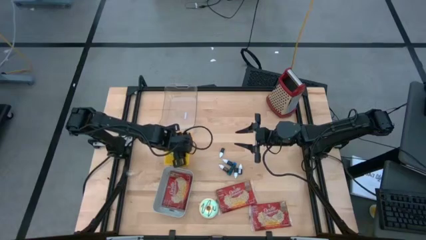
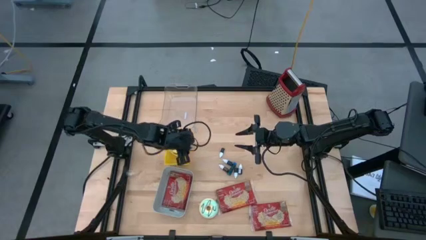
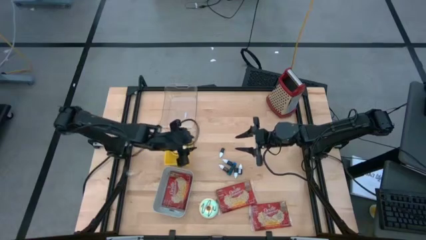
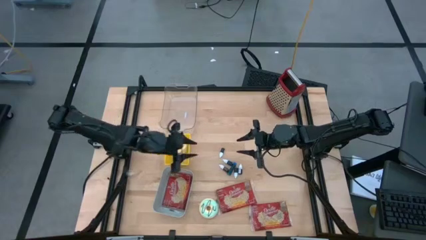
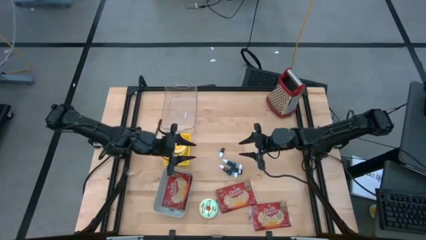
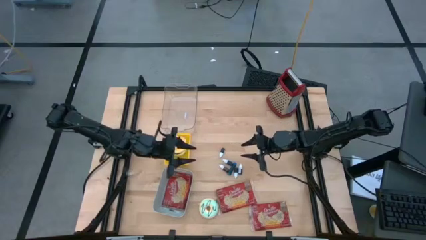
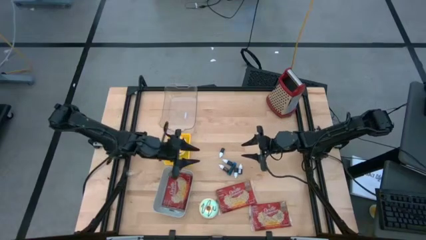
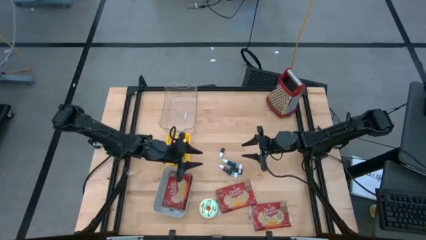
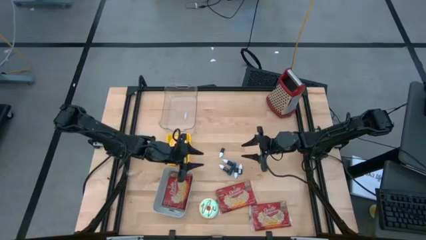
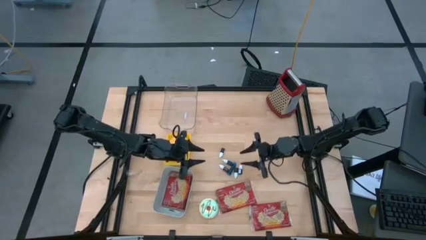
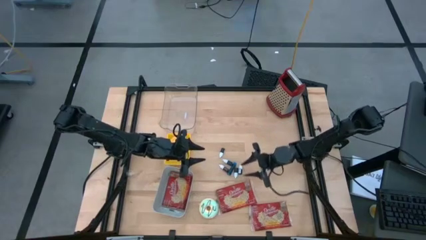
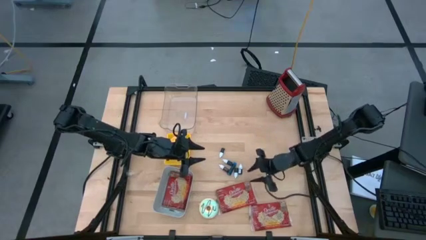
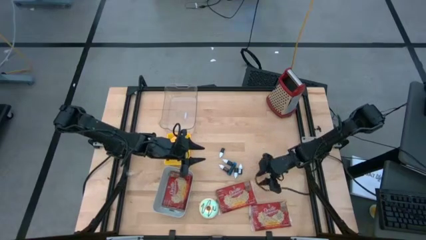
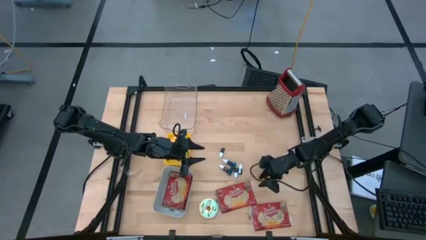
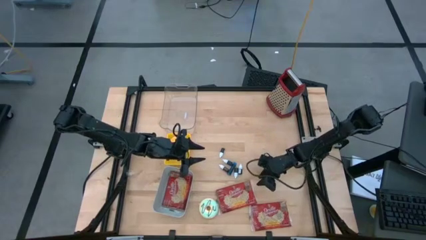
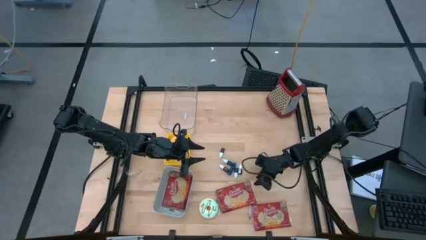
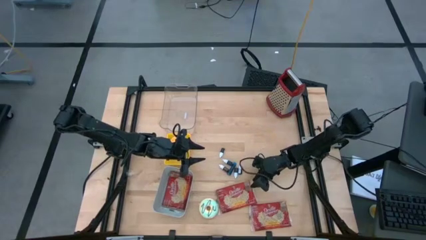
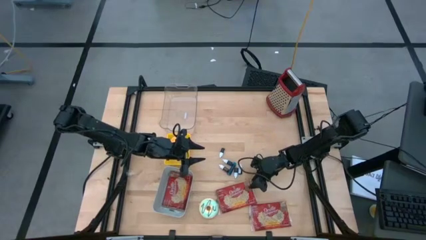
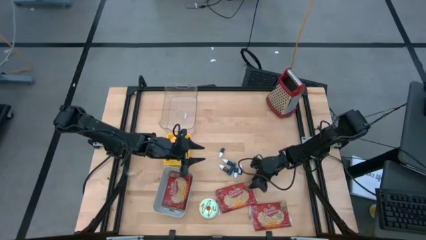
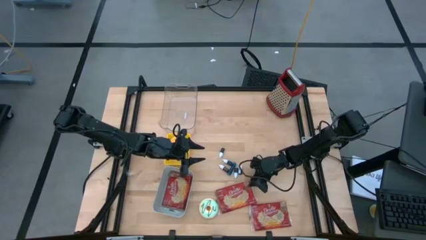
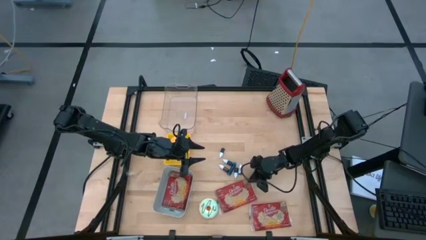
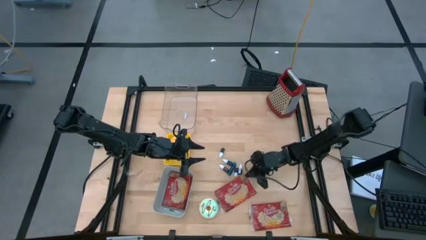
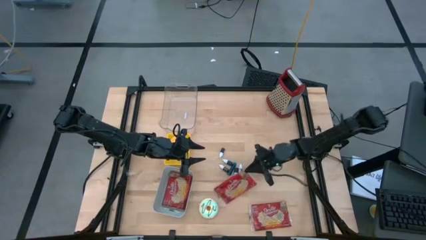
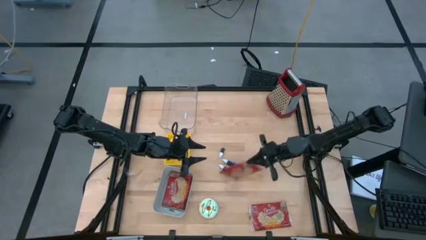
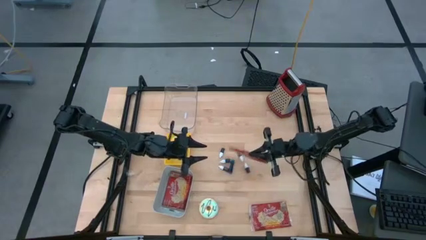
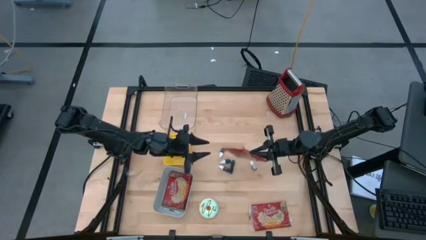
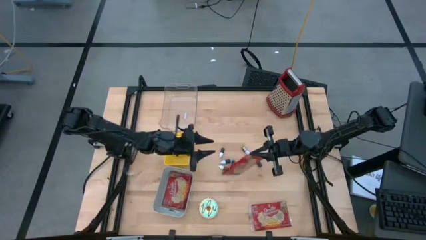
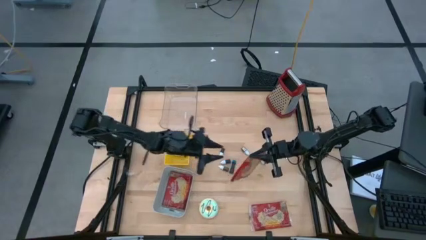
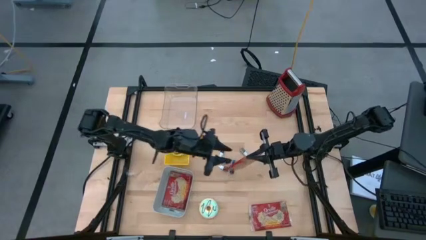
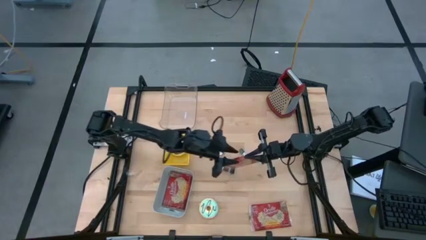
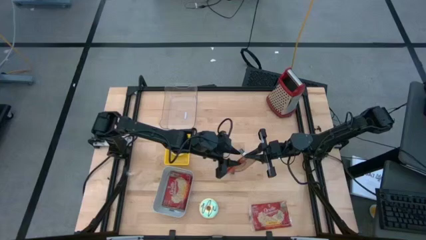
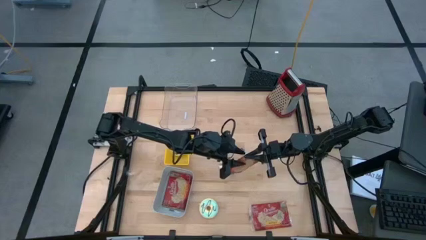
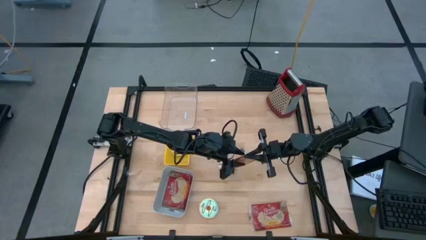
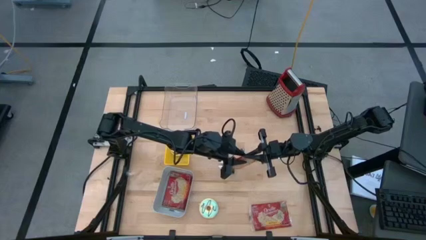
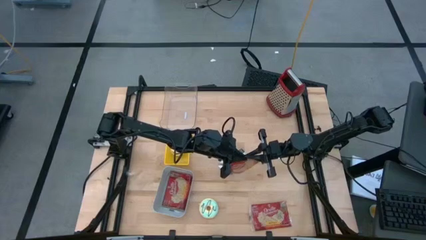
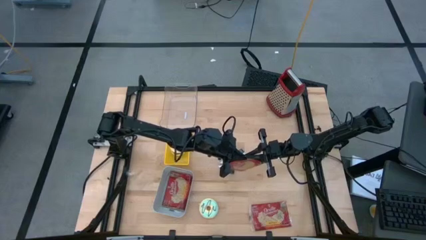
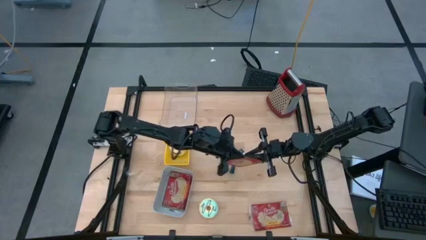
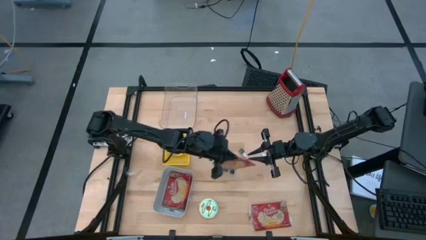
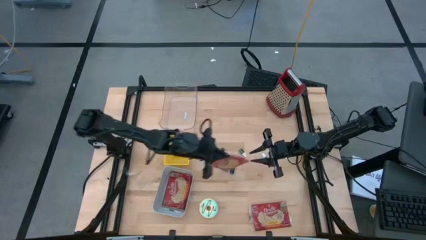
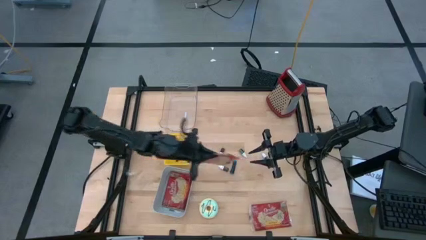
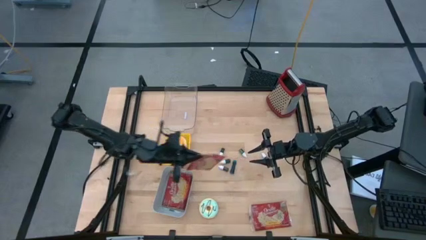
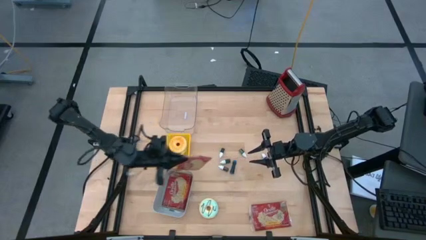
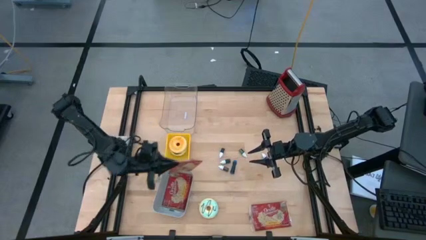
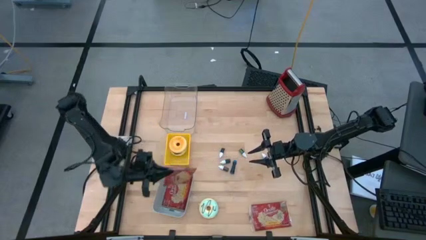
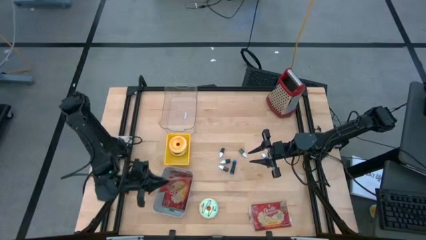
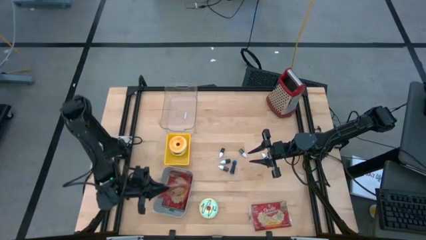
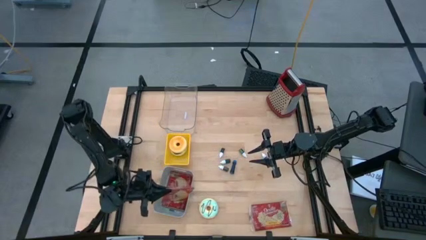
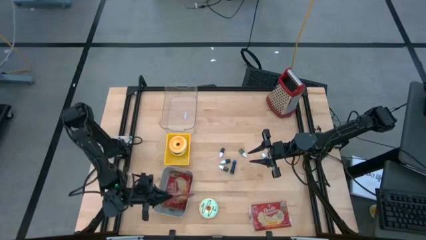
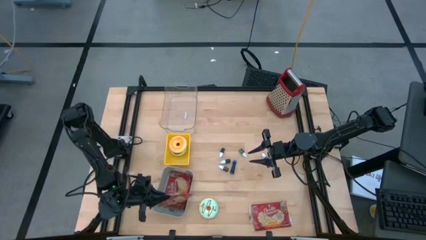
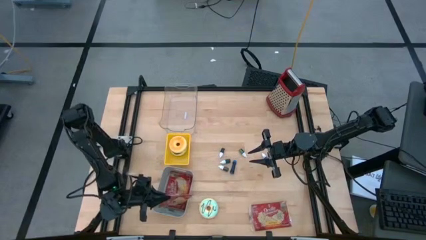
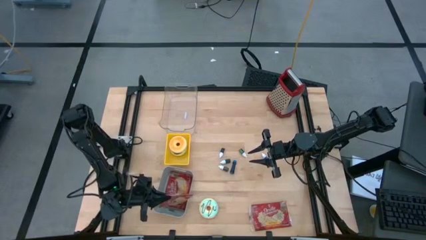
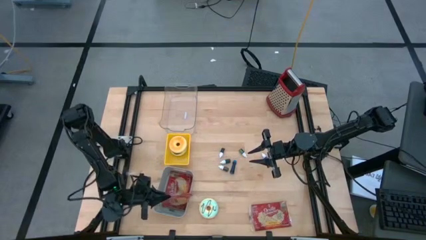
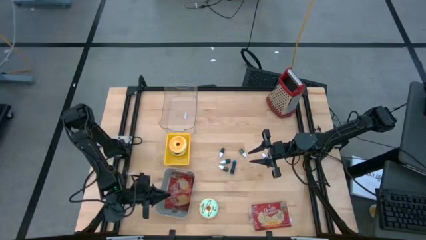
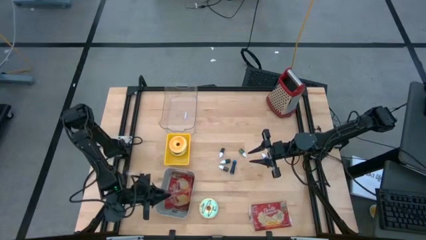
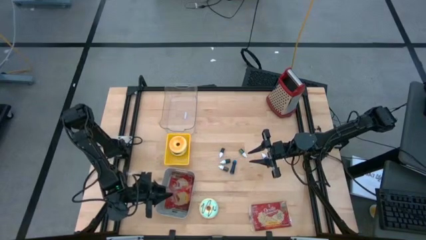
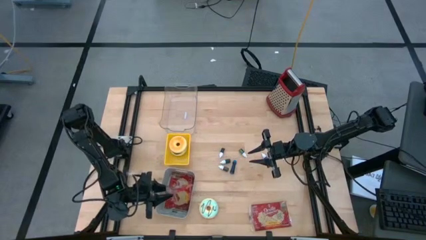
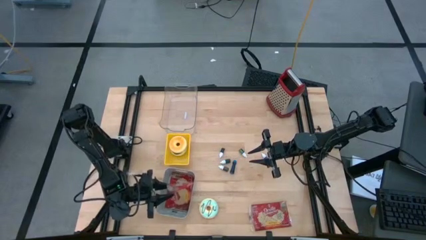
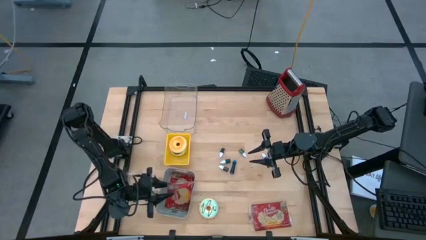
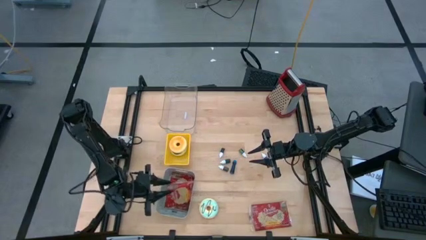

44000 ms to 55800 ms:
Task: Pick & Place Food Item
Put the left red popcorn bag into the white bin

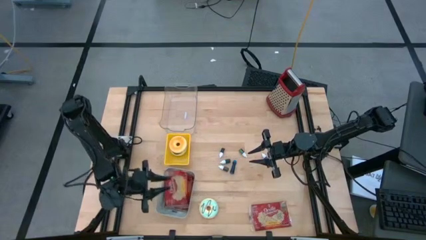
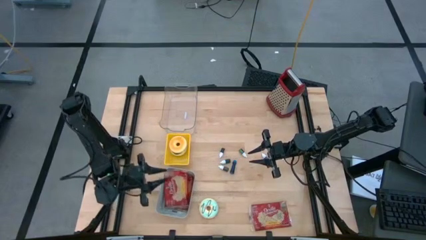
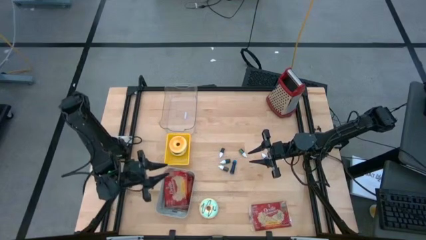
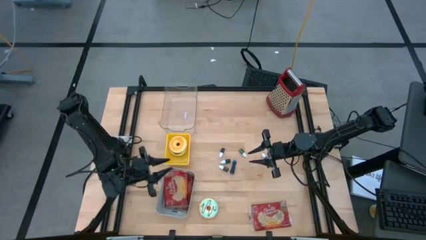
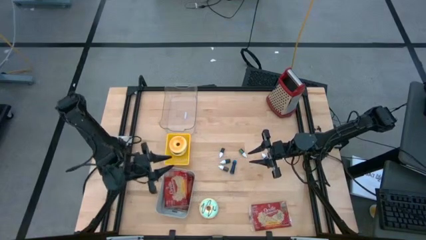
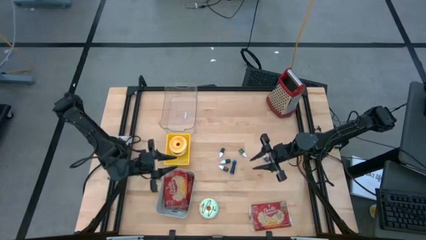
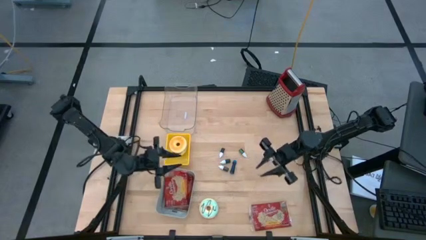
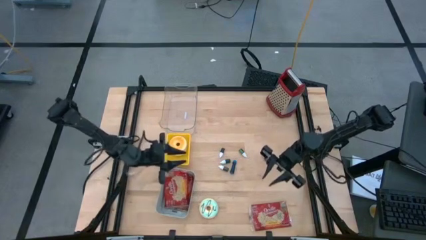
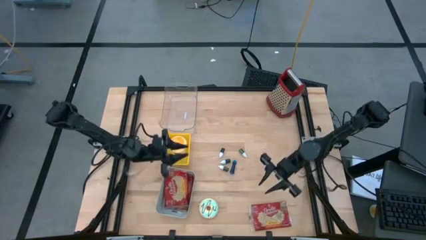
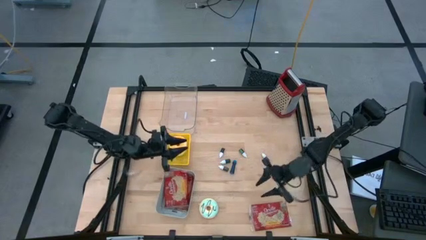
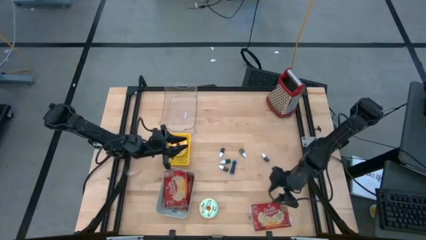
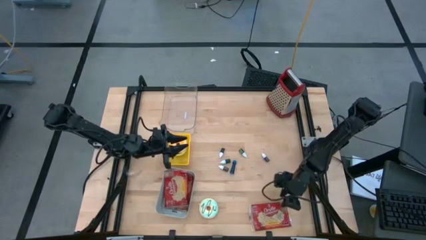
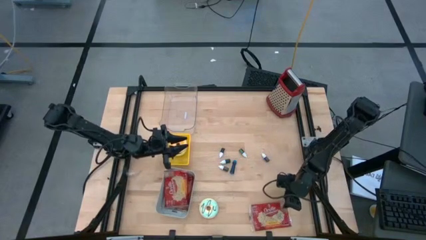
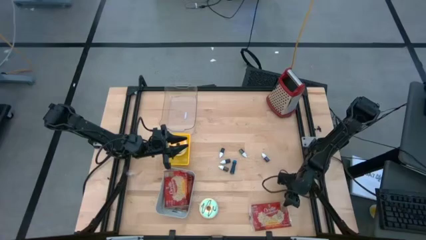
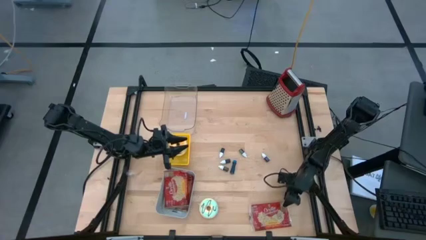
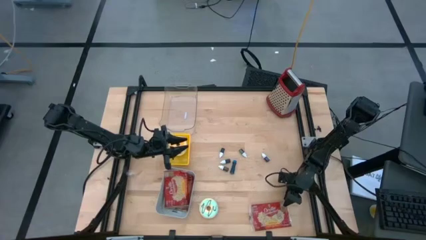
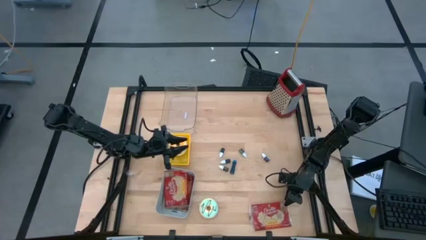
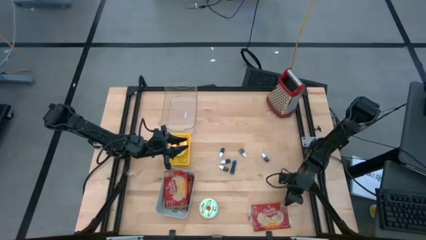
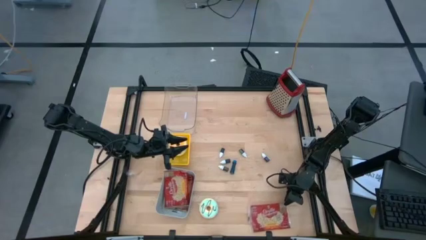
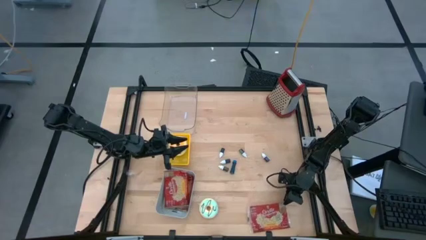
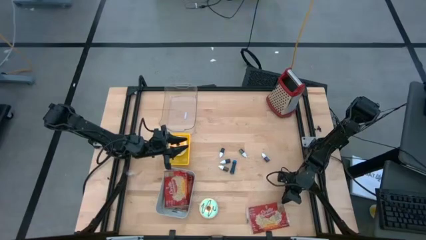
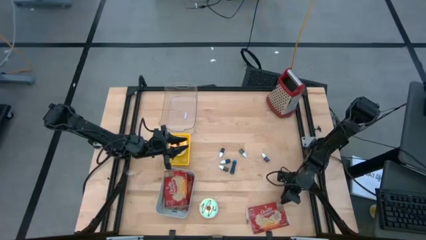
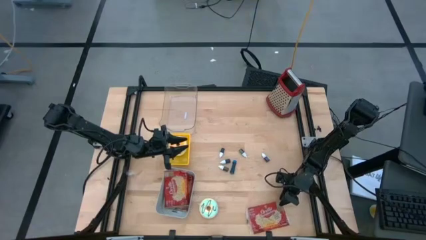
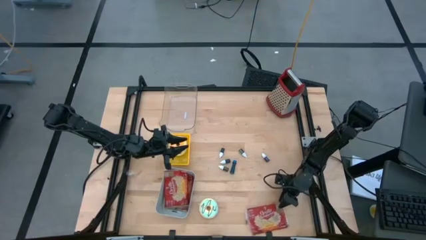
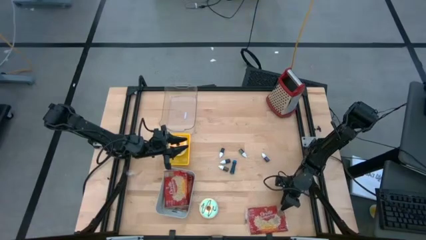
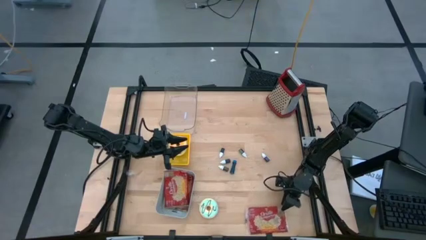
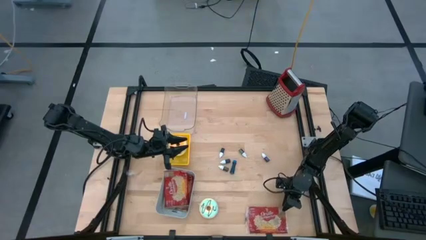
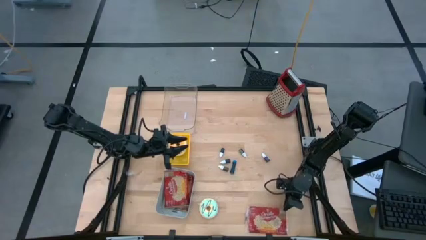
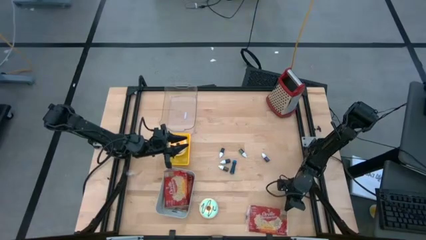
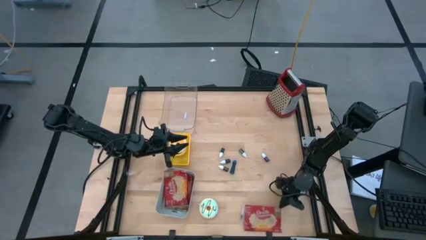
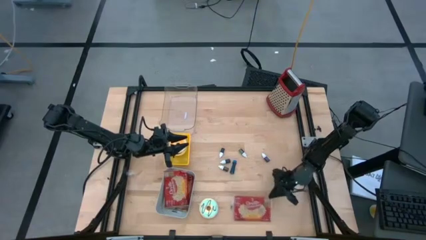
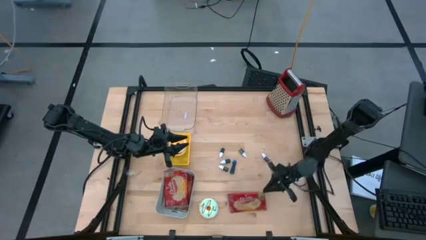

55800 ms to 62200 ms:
Put the red popcorn bag into the white bin
